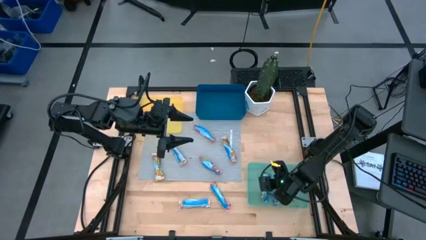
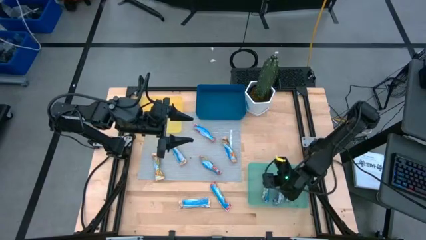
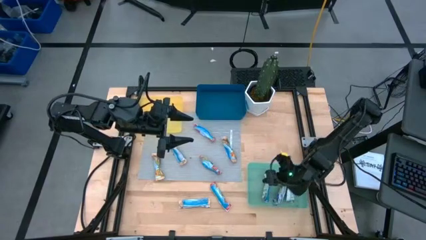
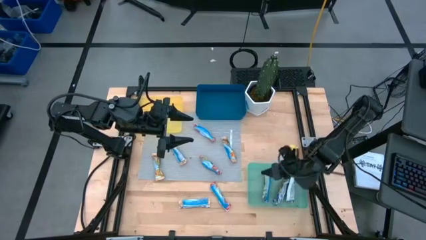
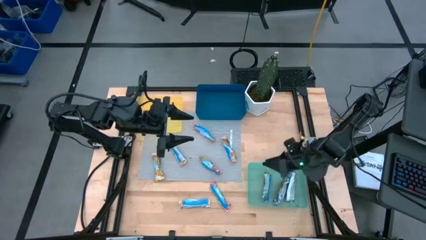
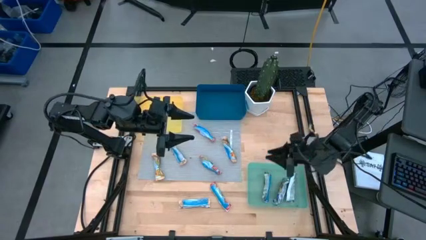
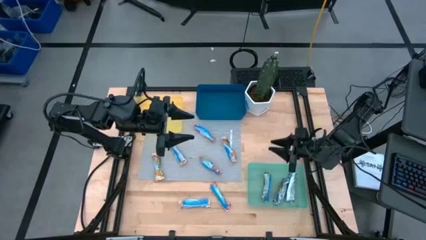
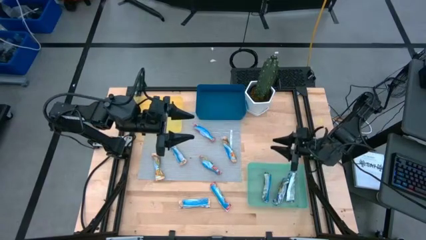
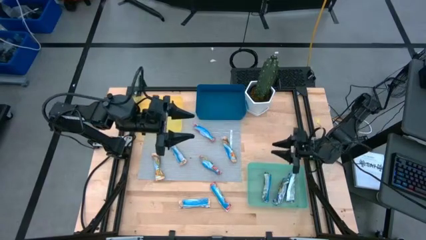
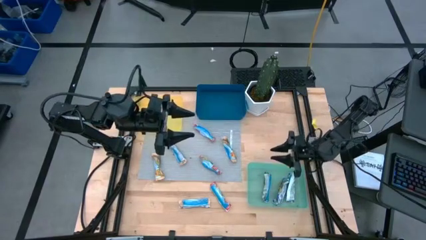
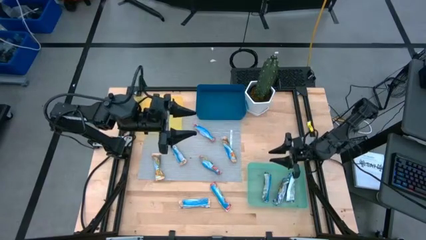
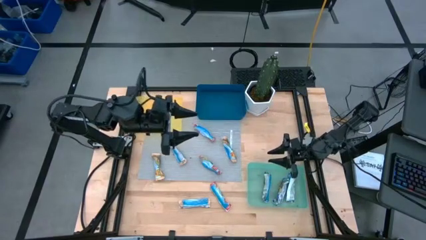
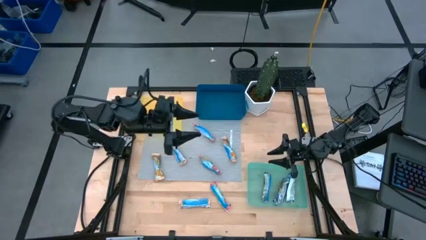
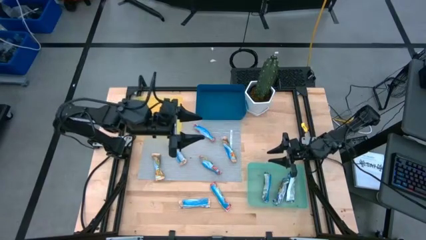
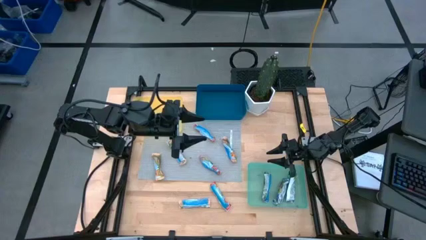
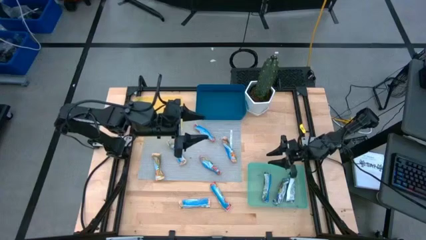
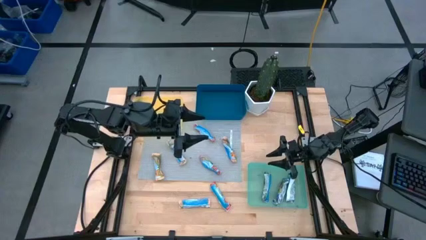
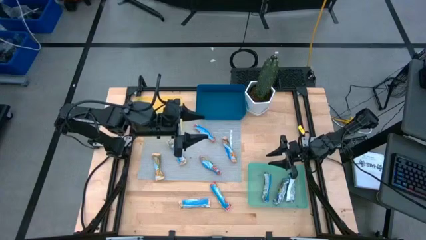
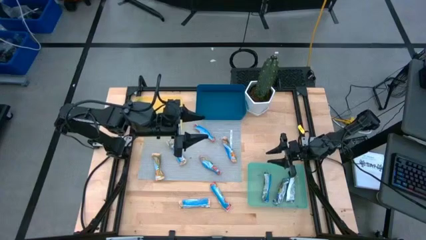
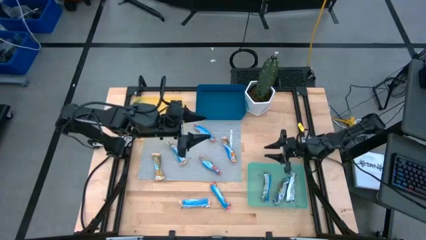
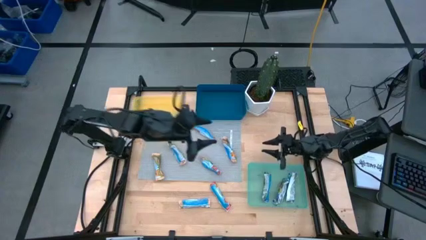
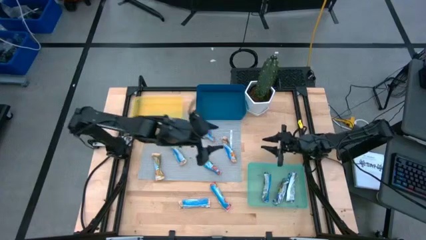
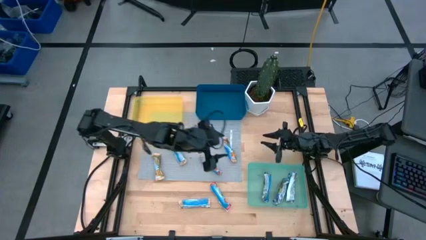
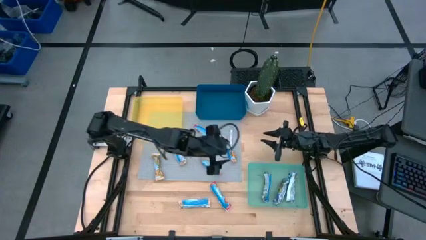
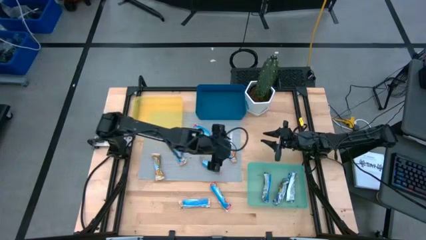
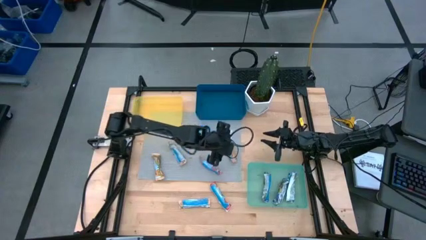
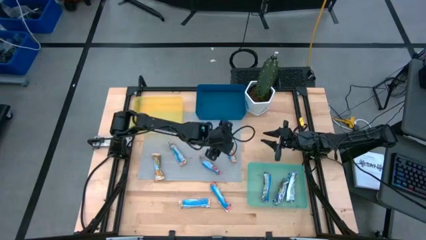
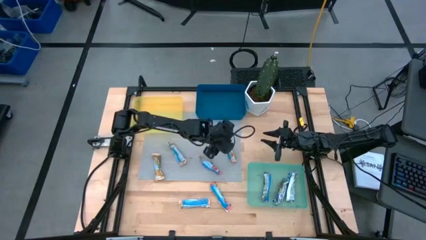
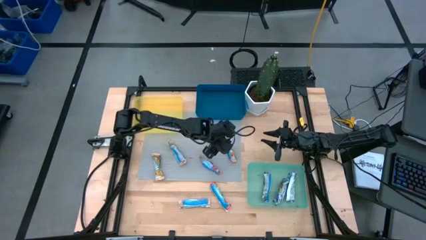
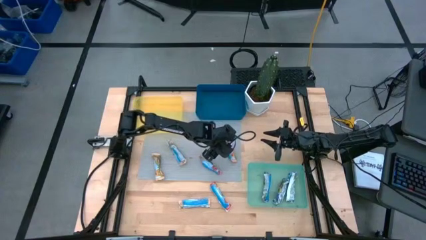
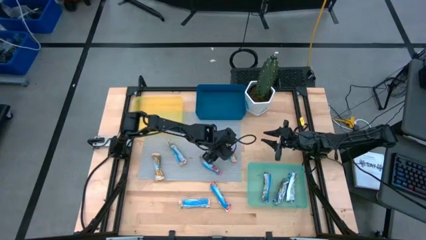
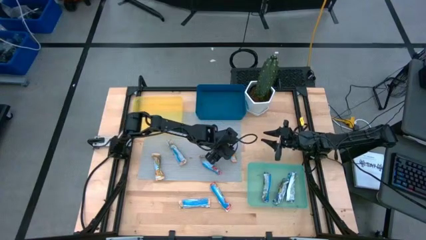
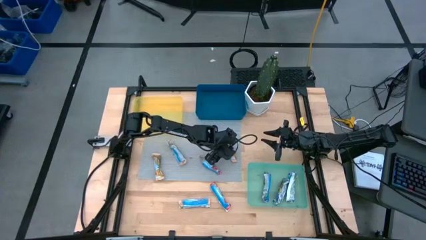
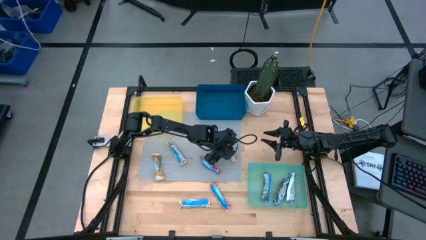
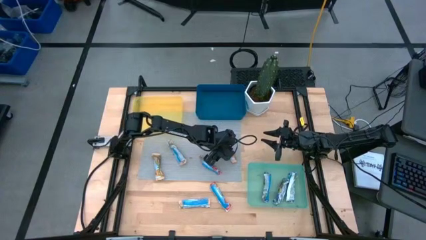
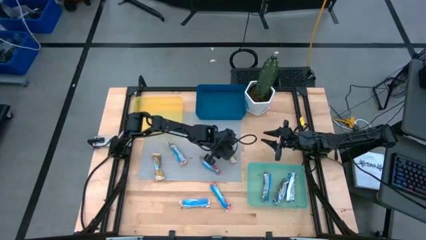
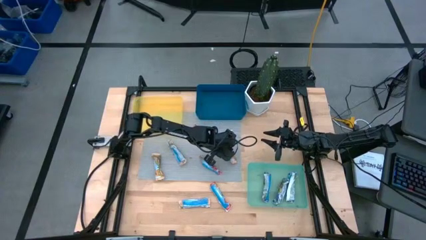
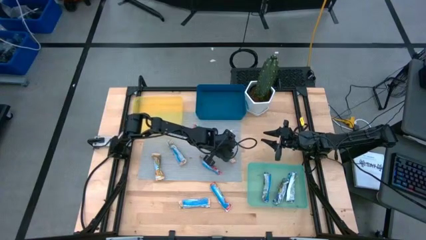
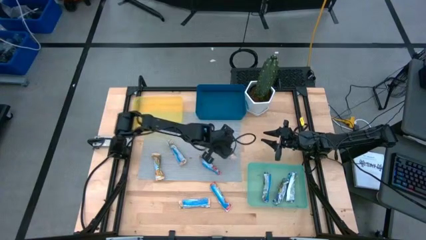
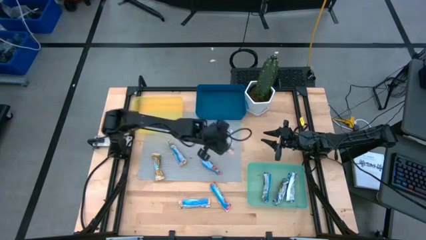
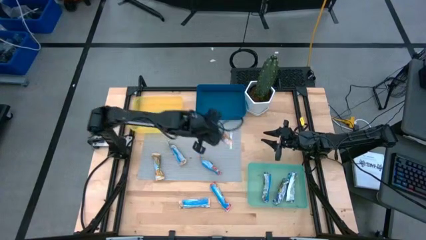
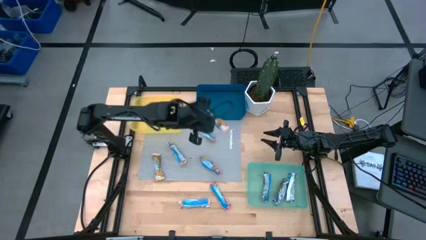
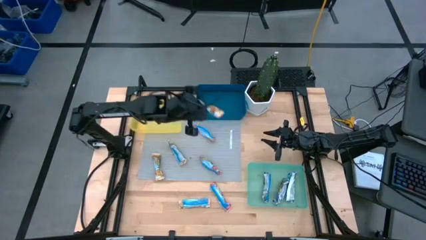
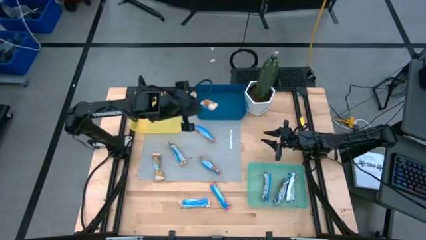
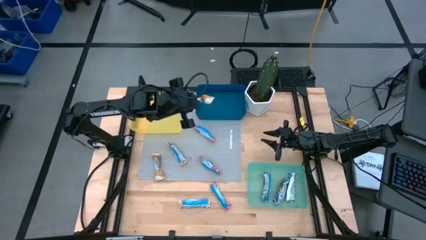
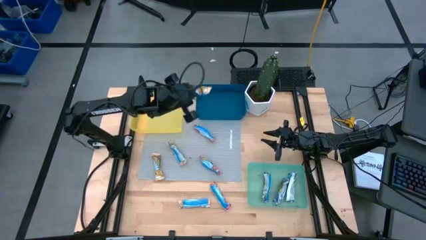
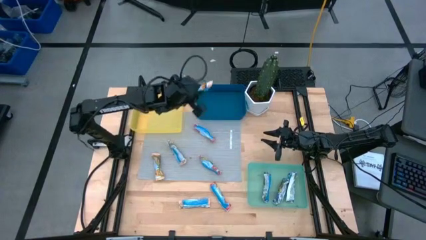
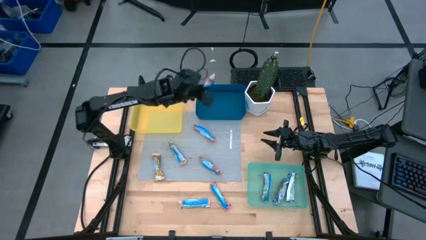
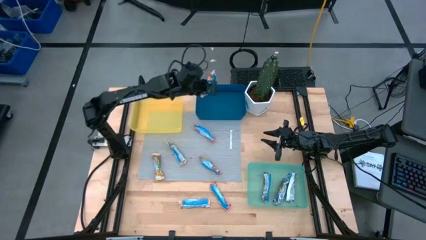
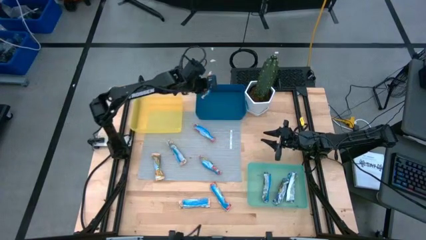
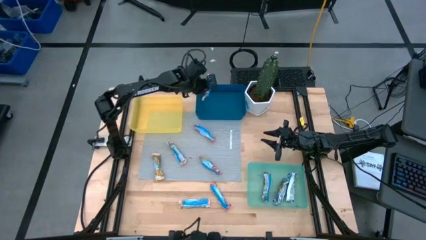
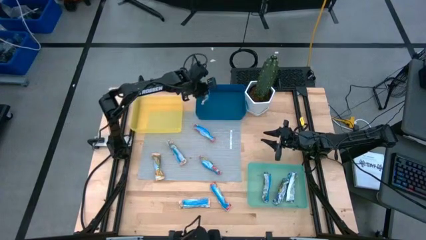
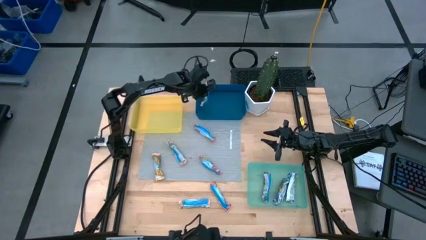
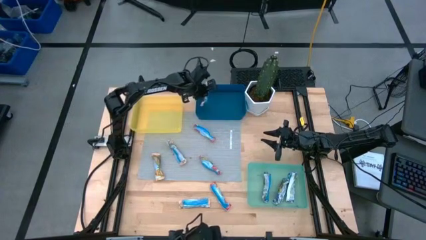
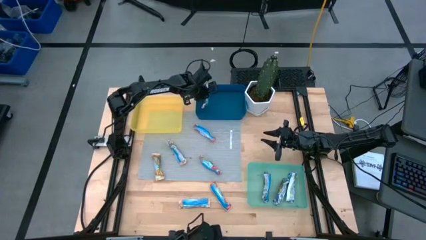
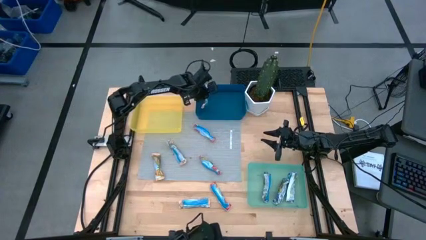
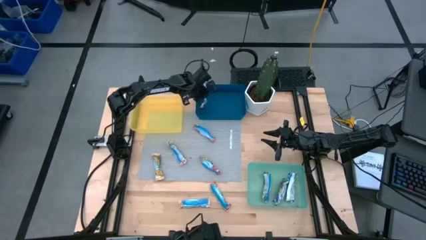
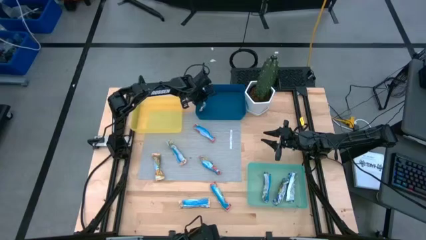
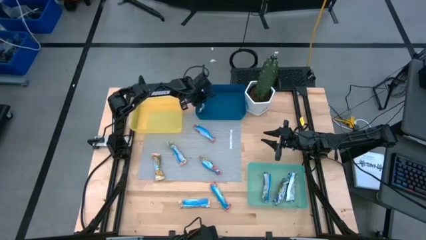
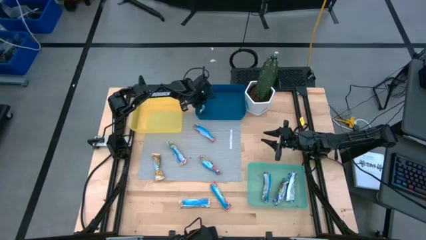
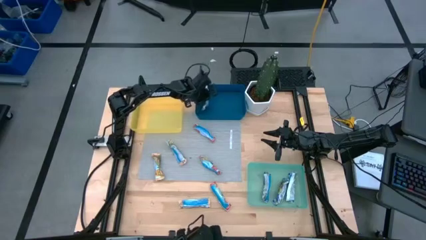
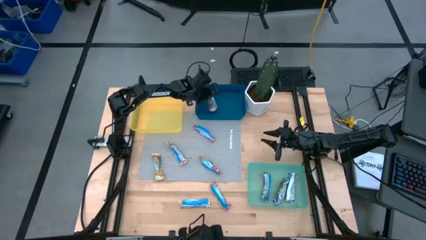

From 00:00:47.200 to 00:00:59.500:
Task: Pick and place Granola Bars by type
Put the yellow granola bar into the blue bin
